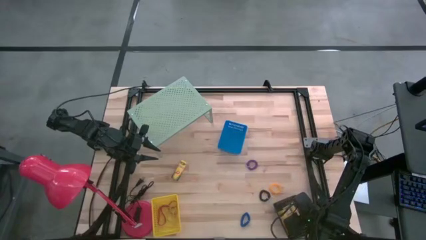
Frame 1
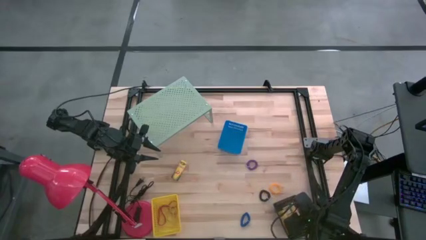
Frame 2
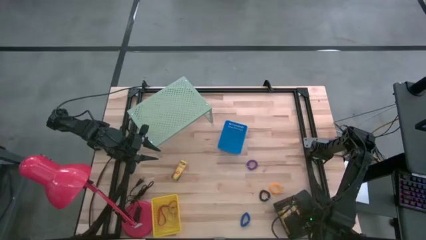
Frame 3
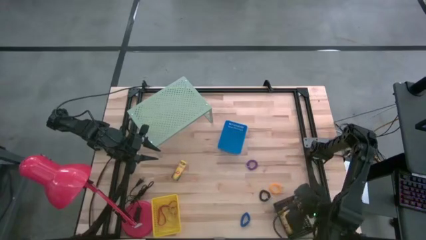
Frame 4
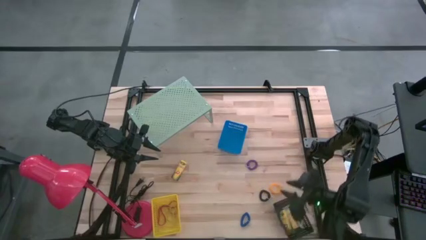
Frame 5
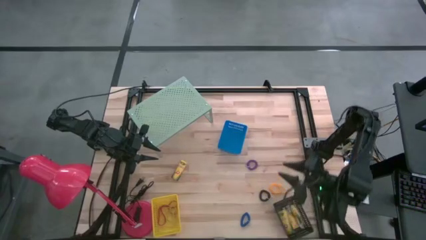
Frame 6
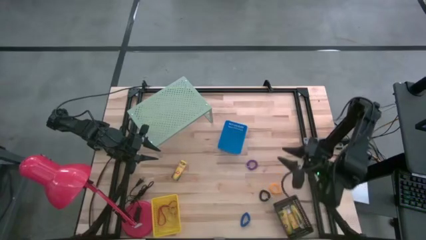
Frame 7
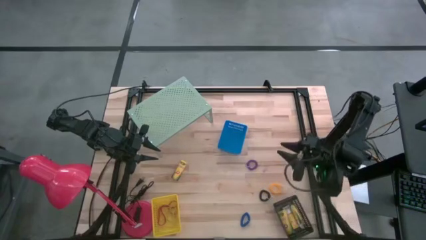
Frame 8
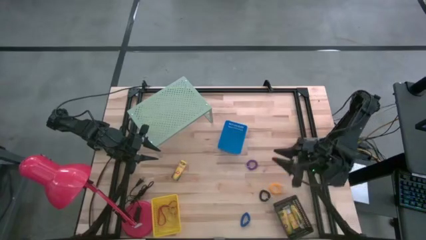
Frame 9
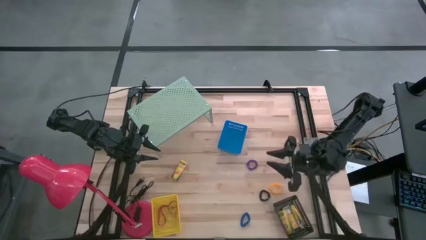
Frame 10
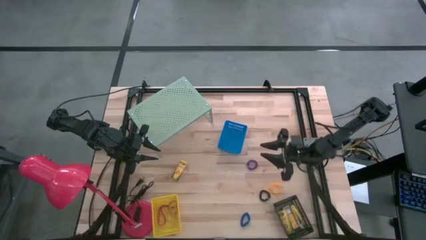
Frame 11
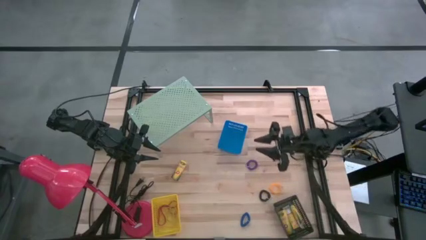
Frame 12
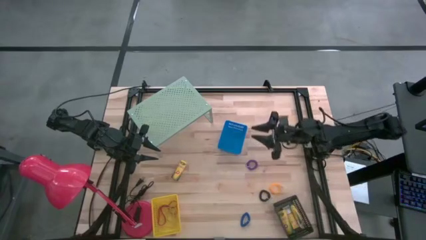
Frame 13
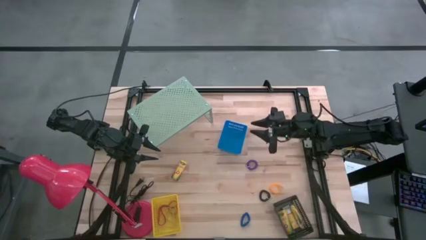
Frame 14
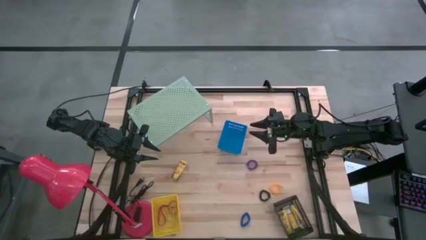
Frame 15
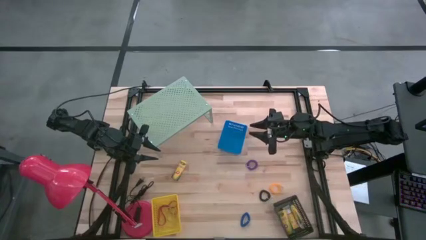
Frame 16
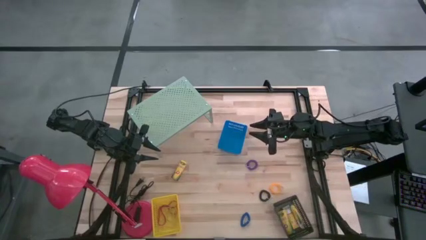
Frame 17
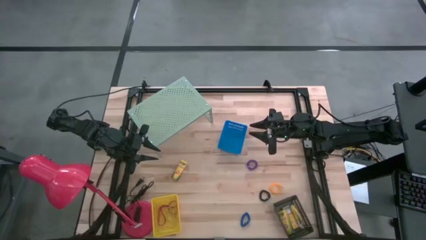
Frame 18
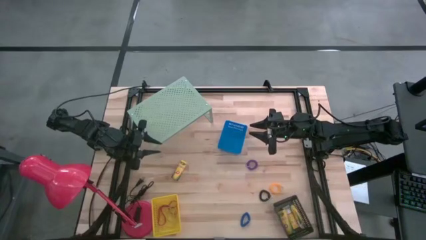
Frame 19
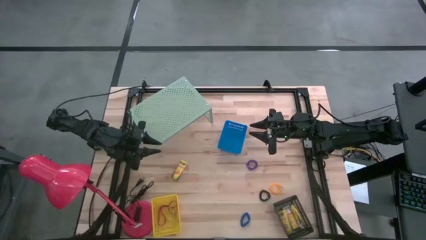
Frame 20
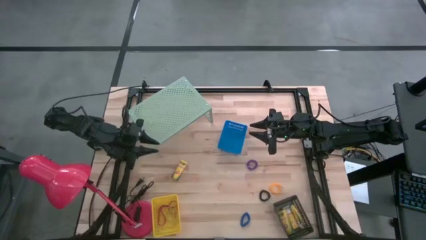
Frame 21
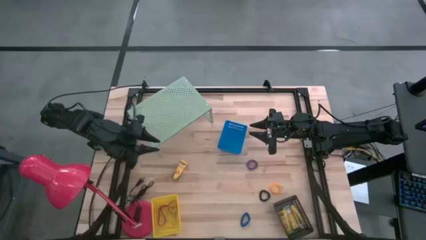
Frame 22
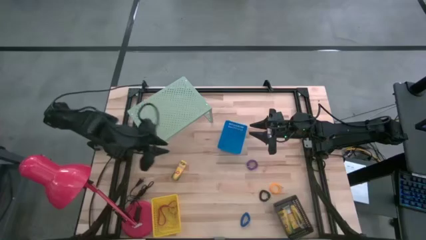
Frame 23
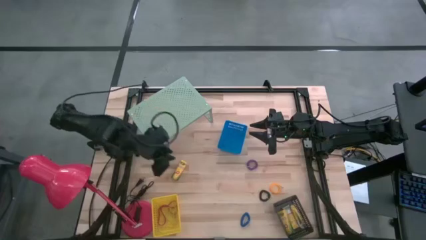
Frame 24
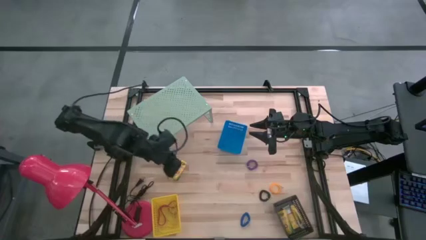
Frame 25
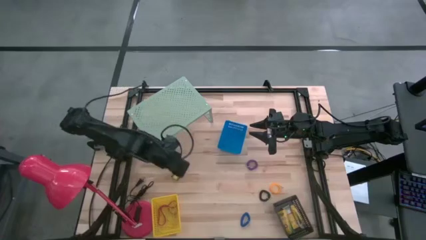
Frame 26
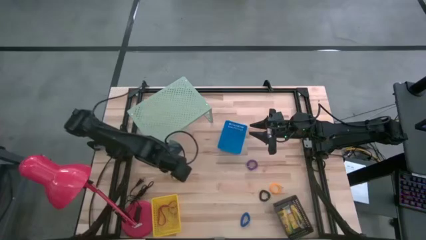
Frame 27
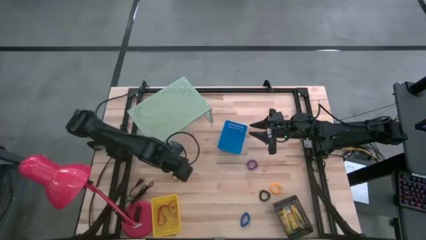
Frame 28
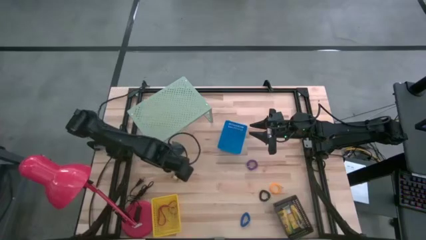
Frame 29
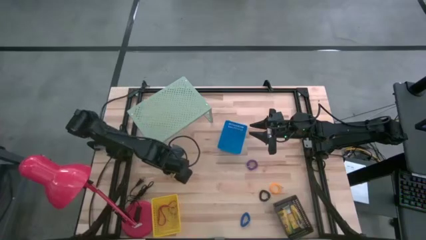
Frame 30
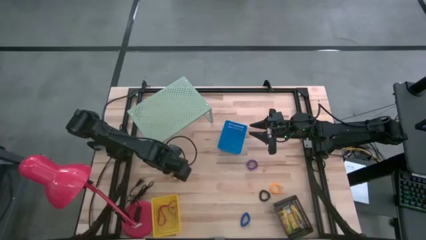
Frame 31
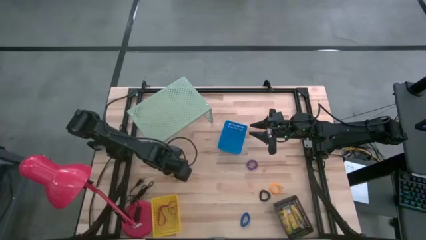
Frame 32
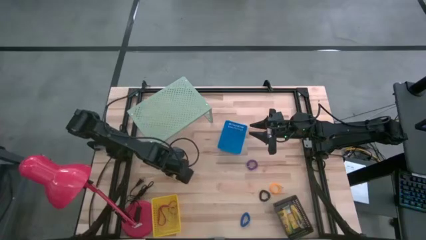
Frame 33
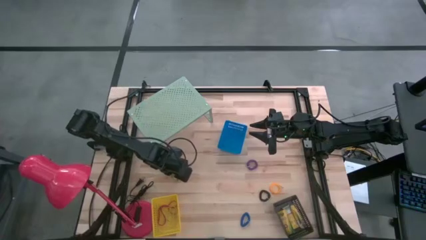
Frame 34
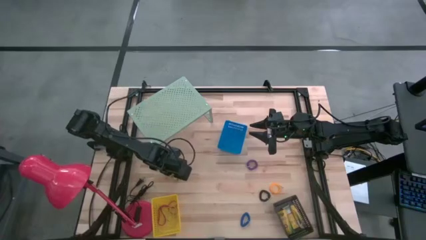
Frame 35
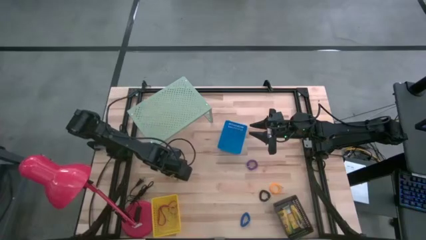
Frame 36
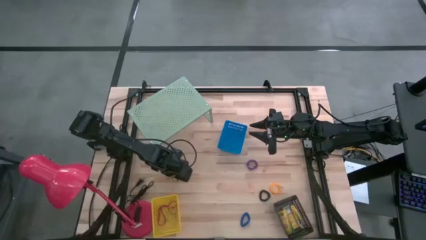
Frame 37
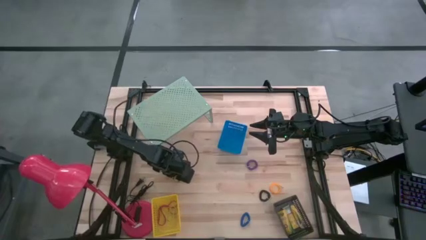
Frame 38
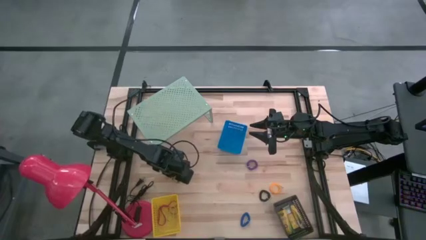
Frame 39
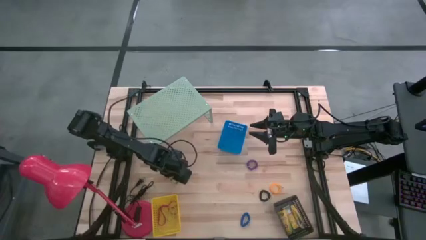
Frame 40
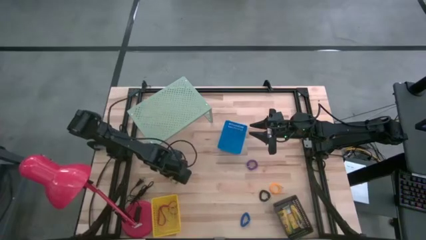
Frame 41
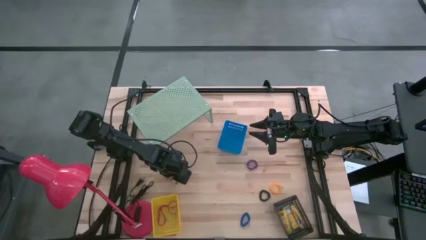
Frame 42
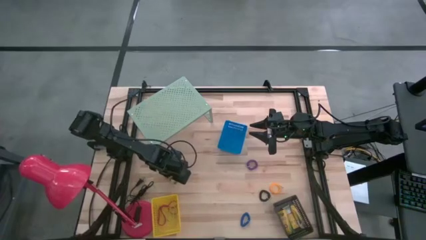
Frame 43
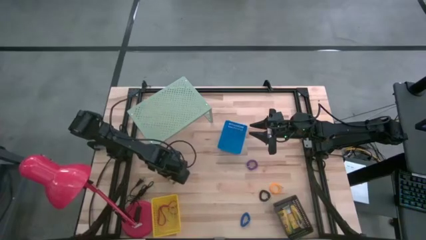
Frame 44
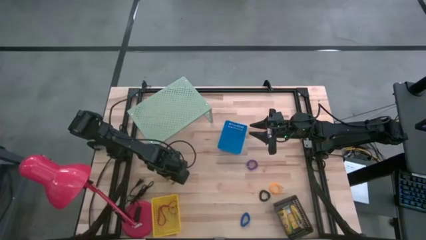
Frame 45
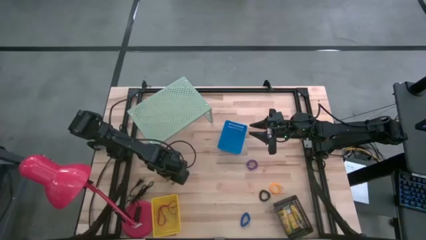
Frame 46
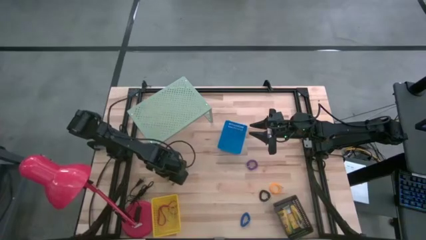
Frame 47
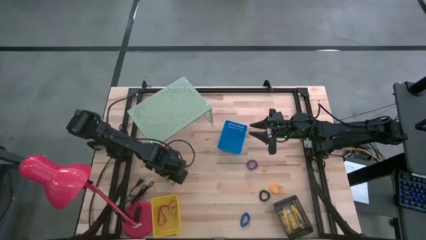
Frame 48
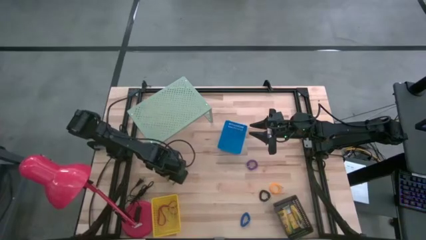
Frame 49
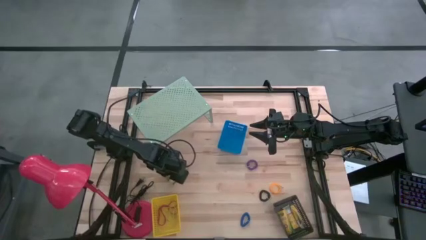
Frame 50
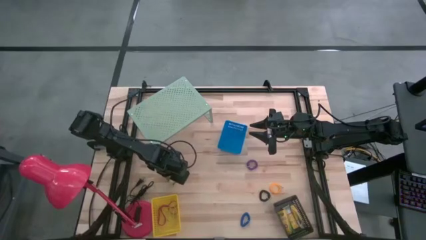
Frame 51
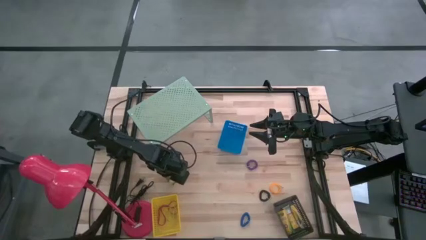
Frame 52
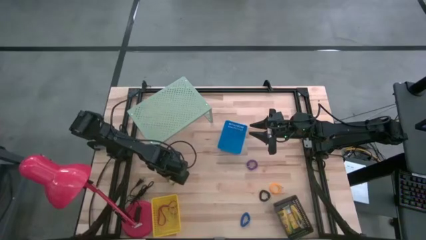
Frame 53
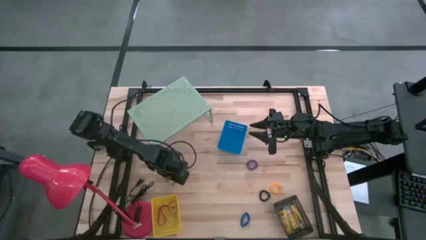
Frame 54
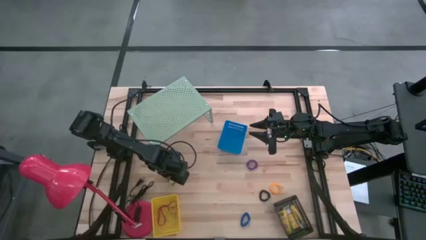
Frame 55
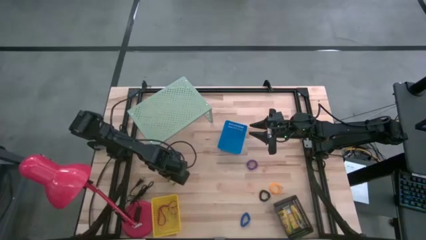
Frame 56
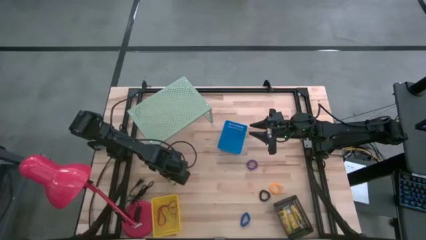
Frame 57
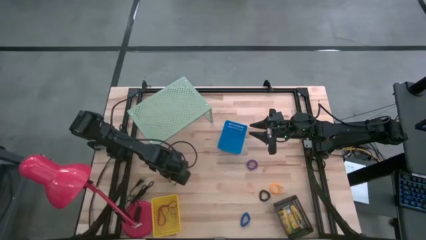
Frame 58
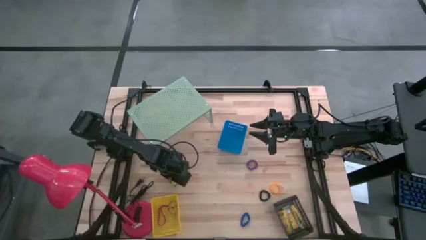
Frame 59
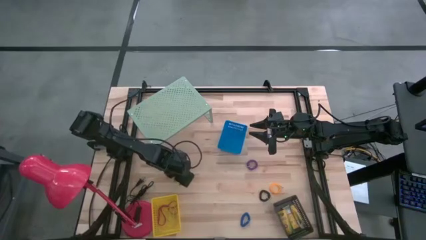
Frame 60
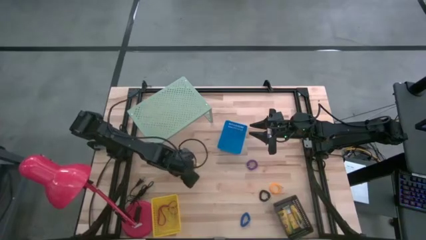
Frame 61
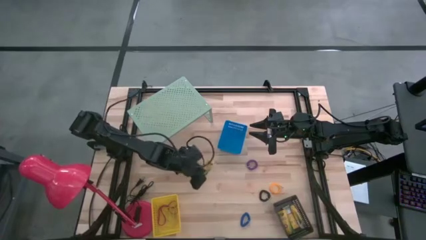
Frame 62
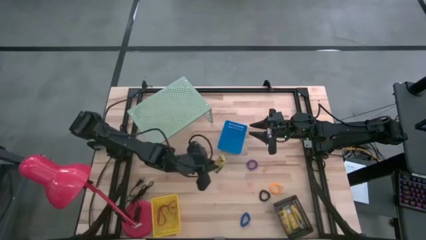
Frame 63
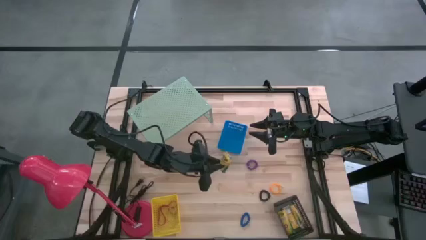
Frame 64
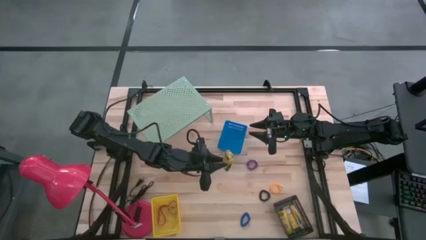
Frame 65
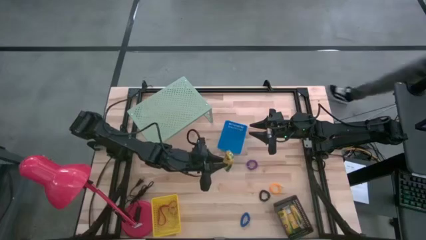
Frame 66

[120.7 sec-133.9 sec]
Task: Pick & Place Office Desk Supplies
Put the crayon into the black basket

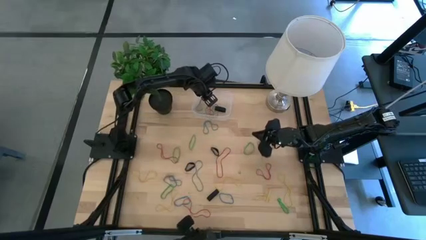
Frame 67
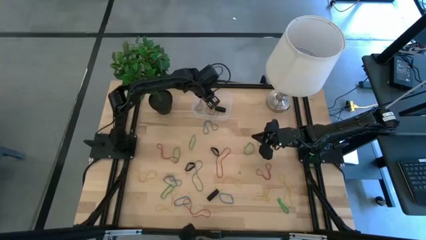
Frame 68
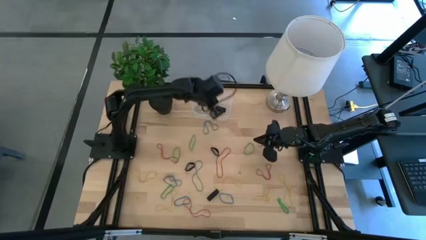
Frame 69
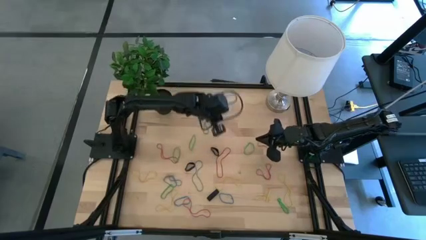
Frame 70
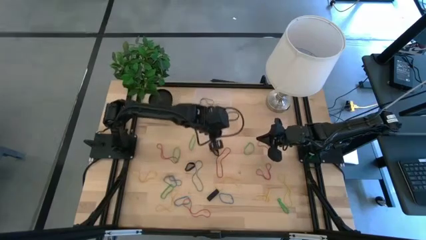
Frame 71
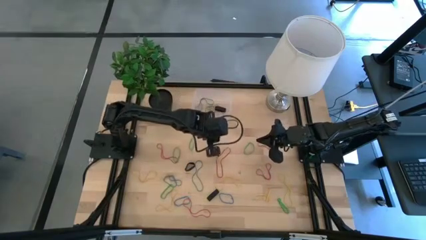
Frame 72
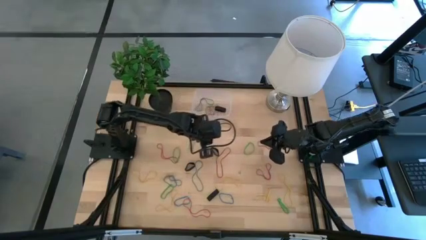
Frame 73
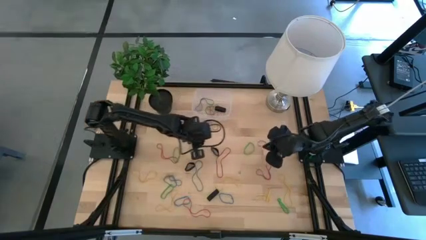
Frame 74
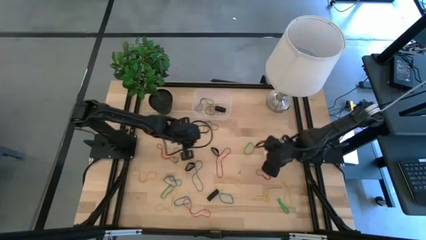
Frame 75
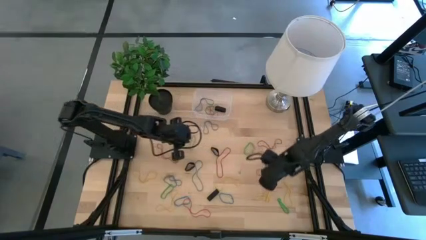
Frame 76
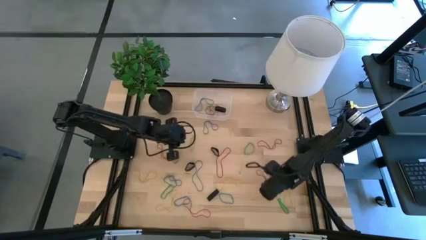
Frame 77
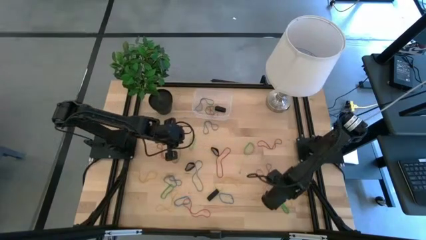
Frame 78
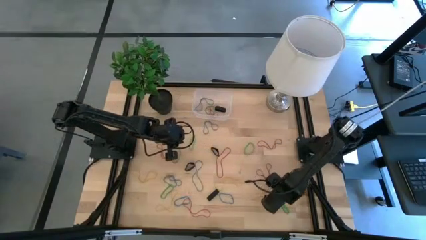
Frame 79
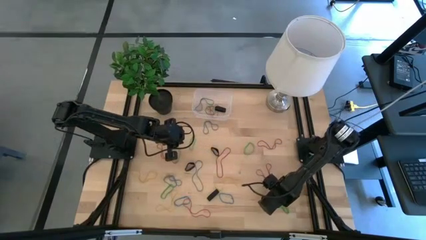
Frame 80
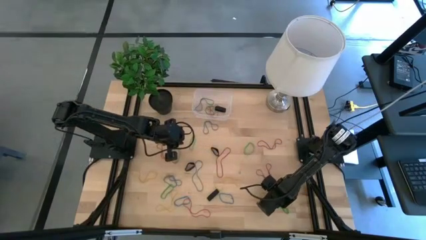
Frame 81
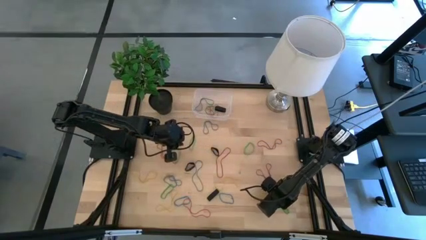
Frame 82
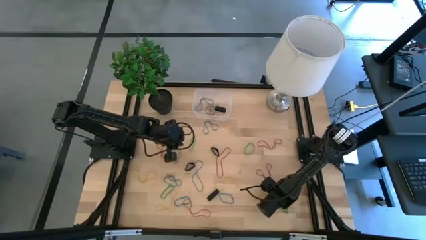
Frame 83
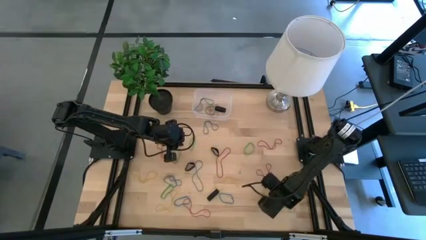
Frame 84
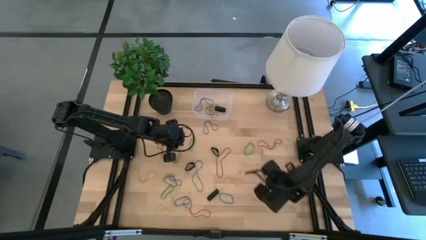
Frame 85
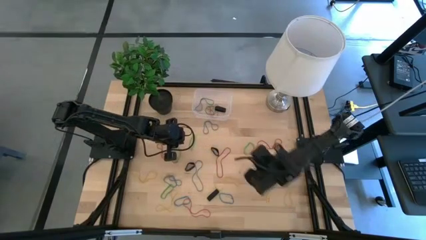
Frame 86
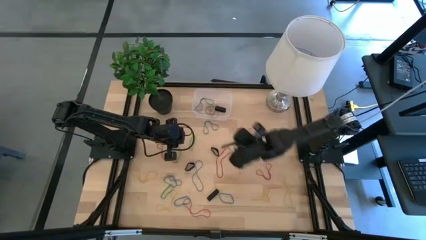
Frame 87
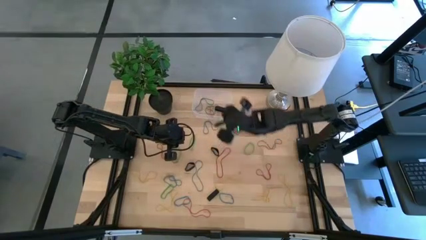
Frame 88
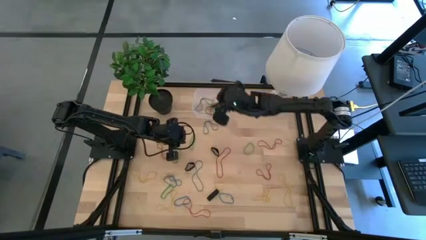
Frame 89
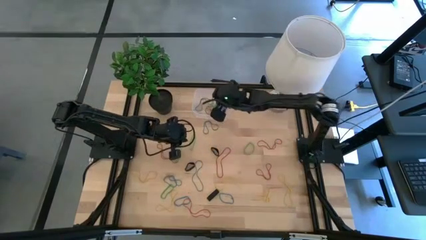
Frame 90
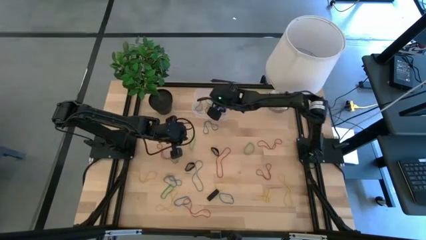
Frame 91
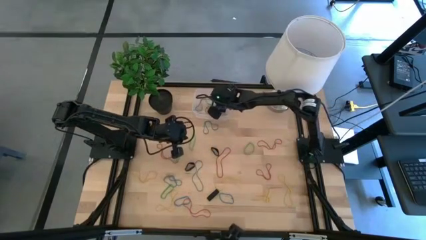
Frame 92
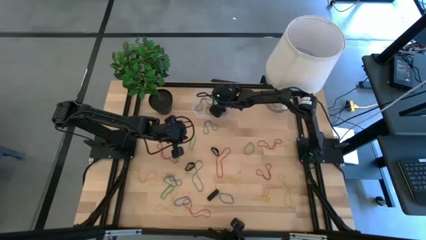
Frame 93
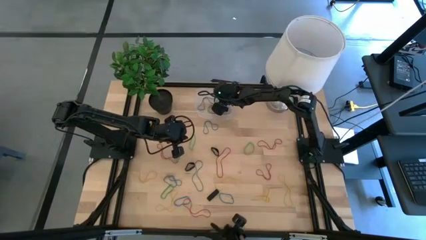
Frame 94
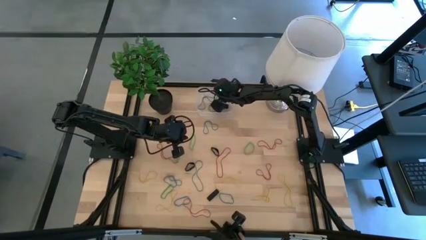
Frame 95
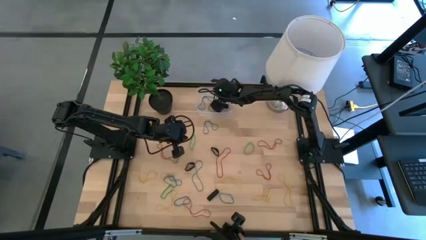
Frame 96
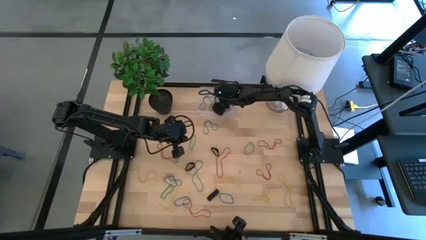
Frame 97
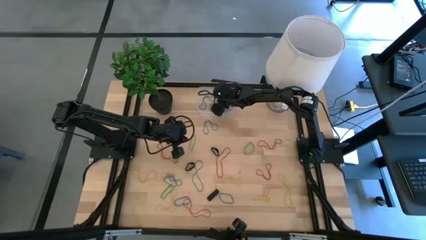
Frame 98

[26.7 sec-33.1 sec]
Task: Pick and place rubber bands into bin
Put the green rubber band into the transparent bin
